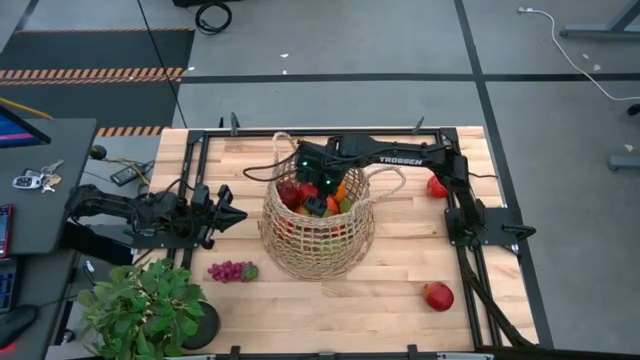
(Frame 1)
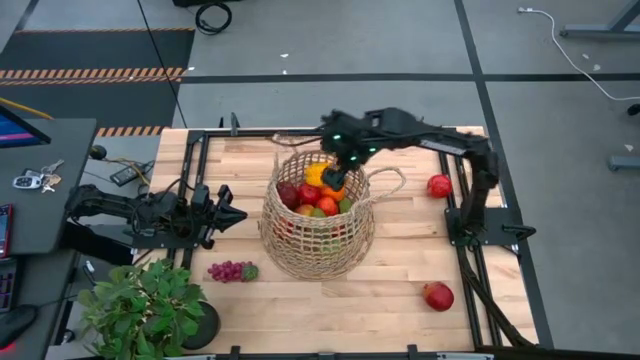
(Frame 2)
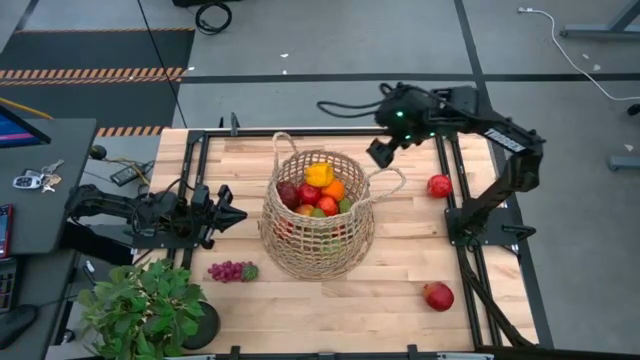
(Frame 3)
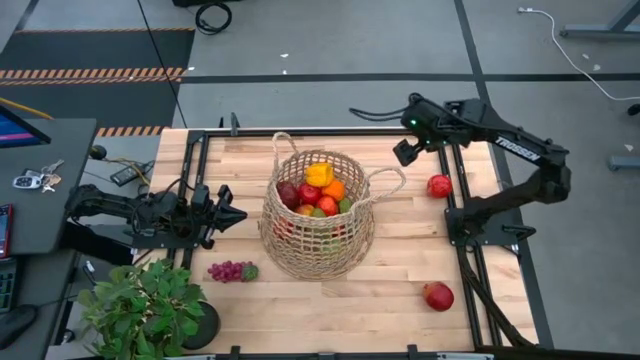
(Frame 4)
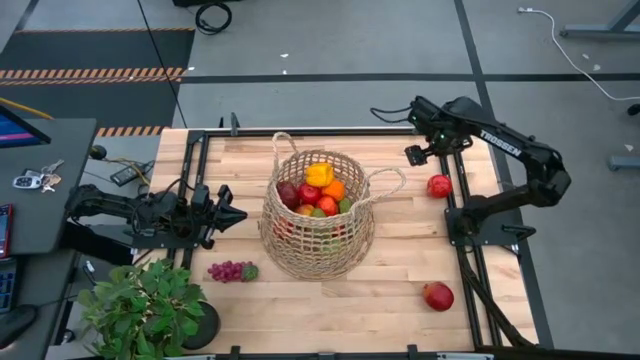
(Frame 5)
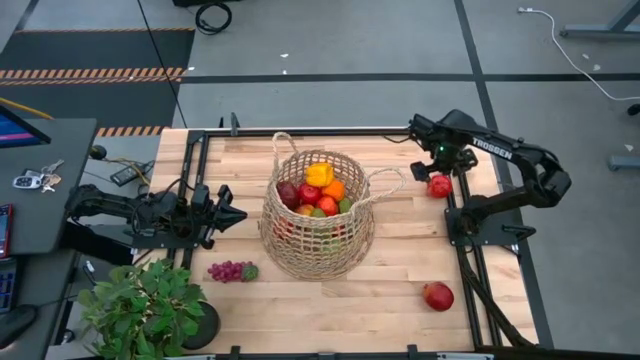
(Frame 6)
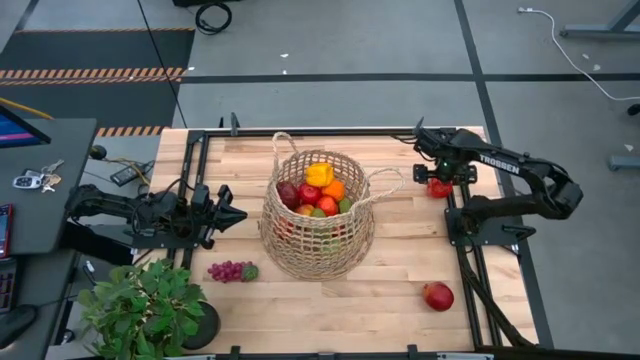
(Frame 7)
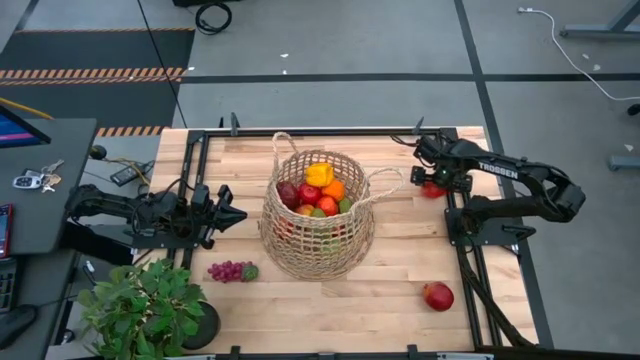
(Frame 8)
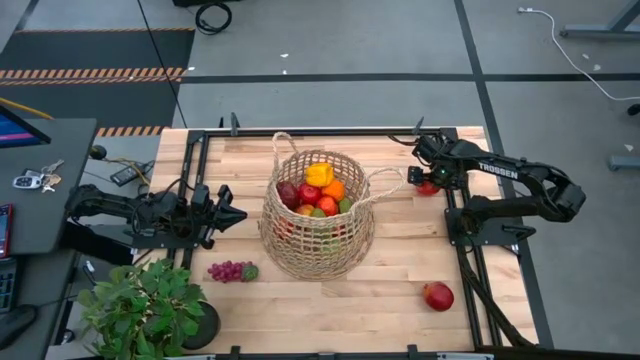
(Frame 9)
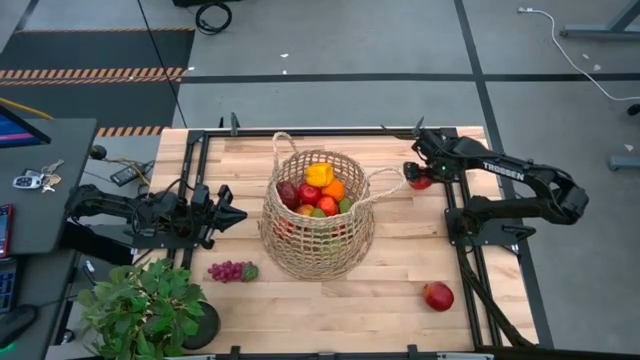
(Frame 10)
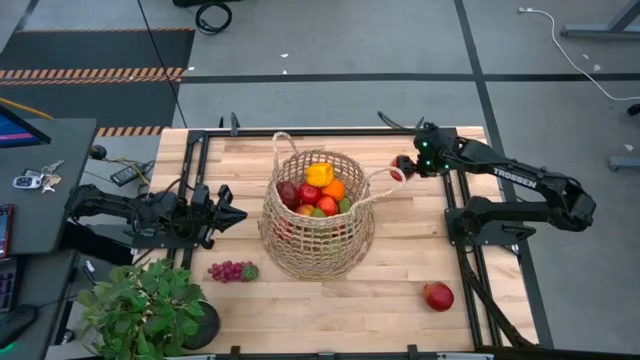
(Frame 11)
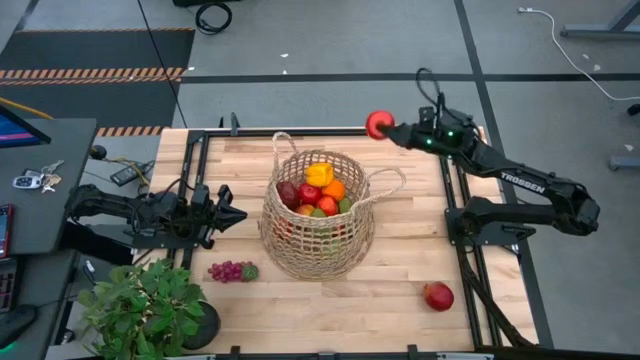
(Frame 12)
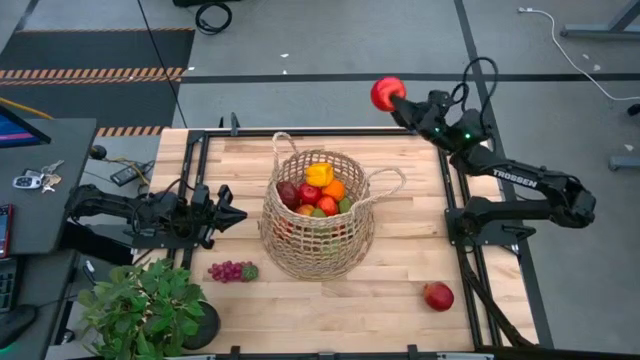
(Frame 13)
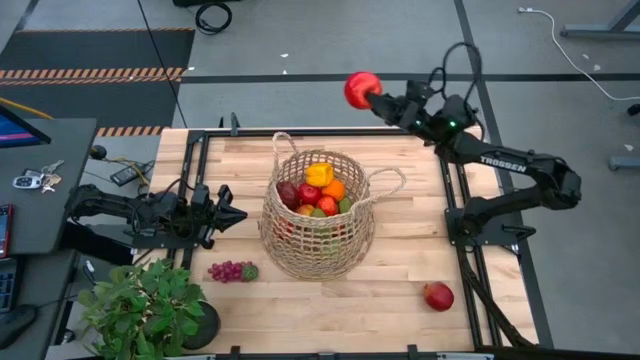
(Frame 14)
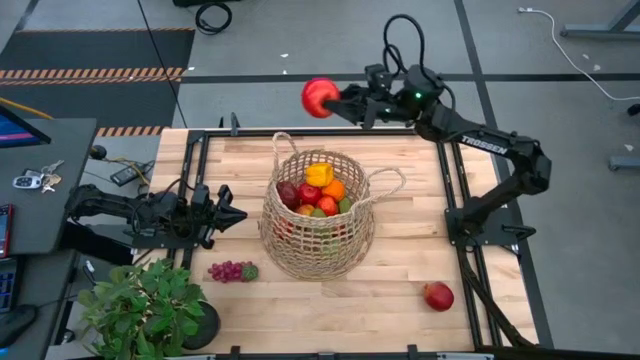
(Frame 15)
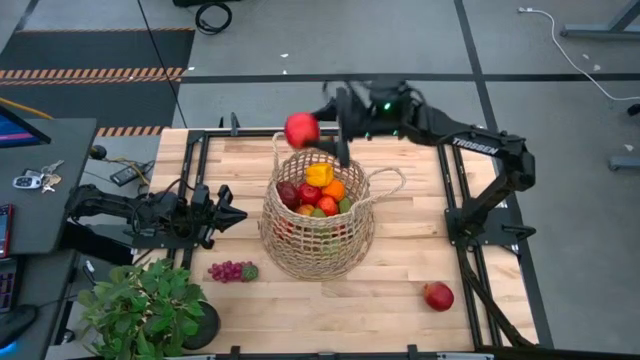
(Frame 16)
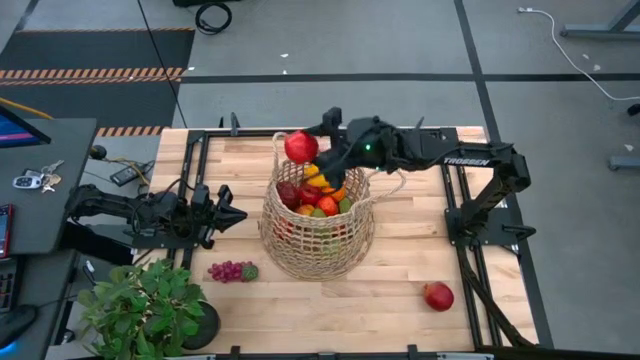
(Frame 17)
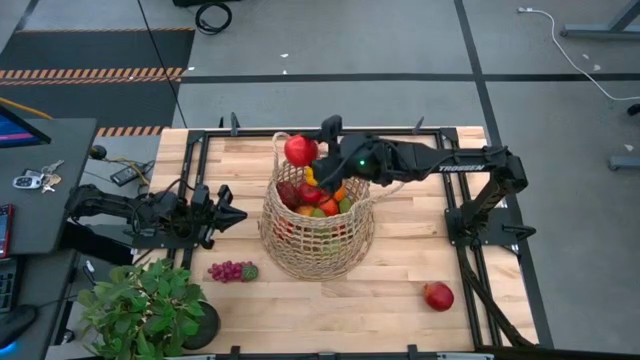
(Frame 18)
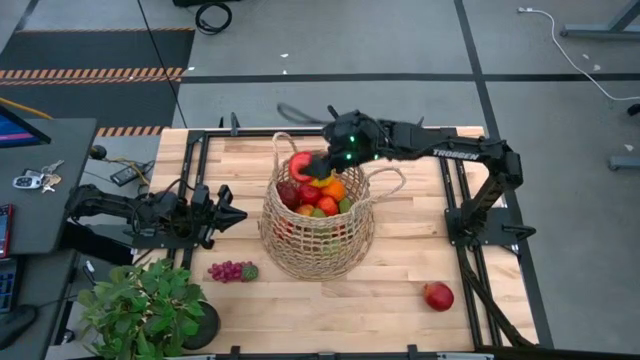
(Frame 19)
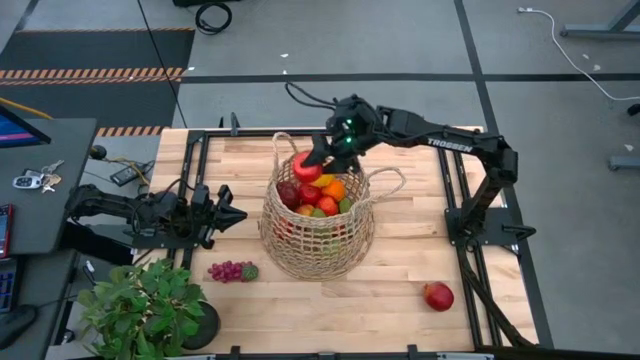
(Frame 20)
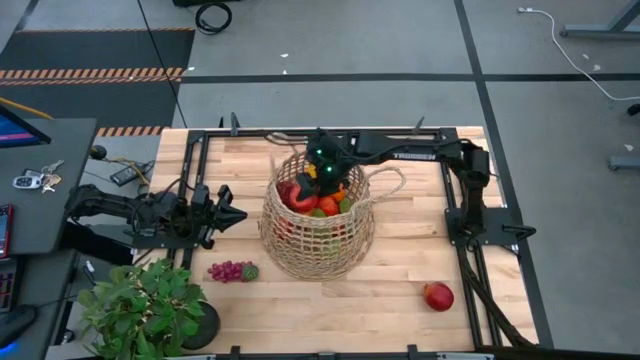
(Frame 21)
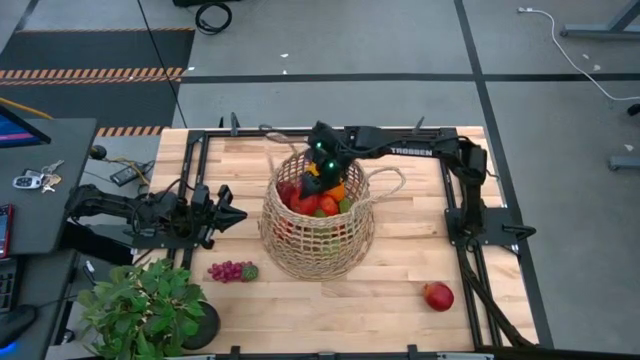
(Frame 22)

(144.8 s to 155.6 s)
Task: Build produce basket
Put the red apple into the brown basket

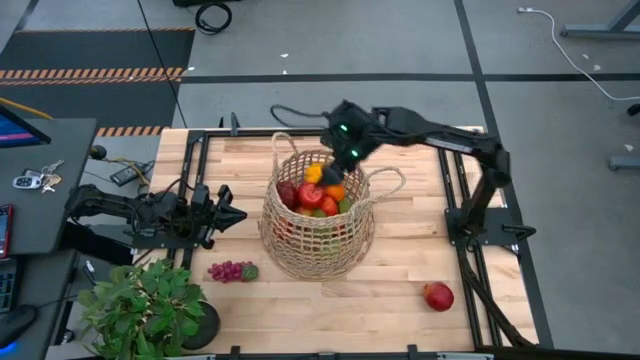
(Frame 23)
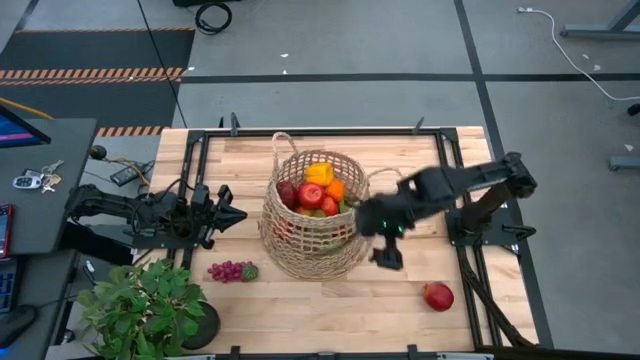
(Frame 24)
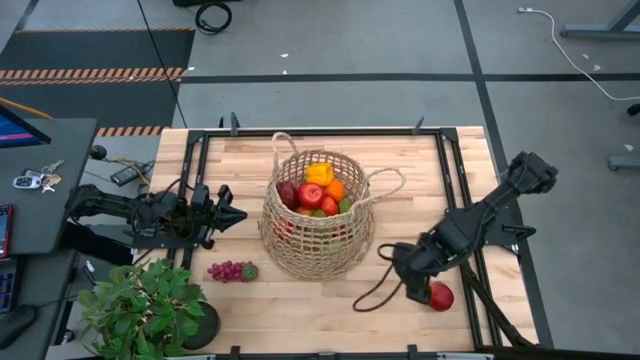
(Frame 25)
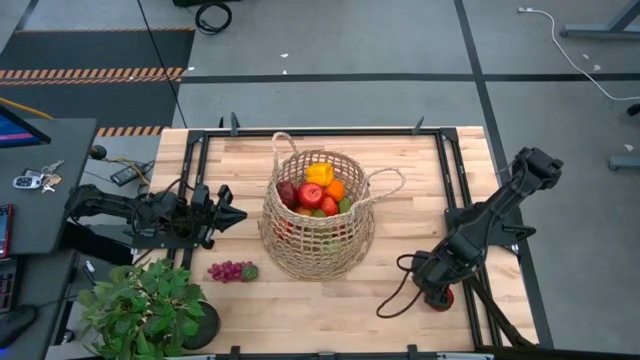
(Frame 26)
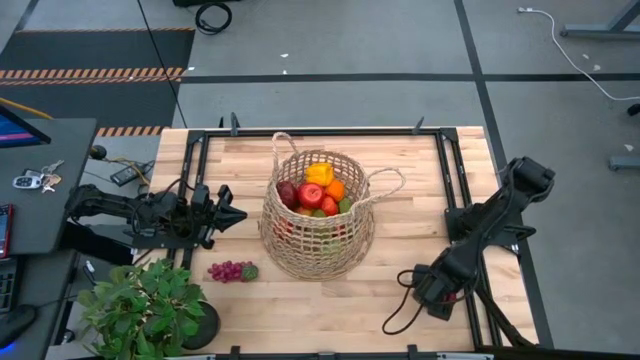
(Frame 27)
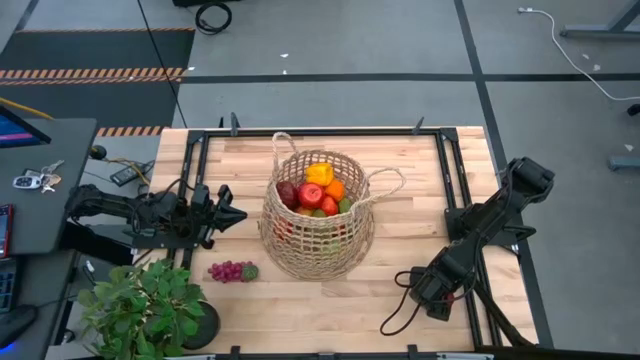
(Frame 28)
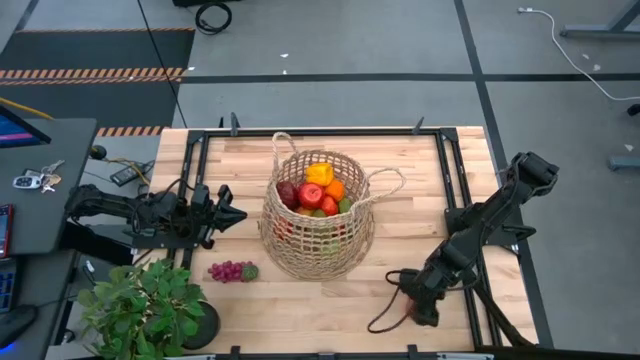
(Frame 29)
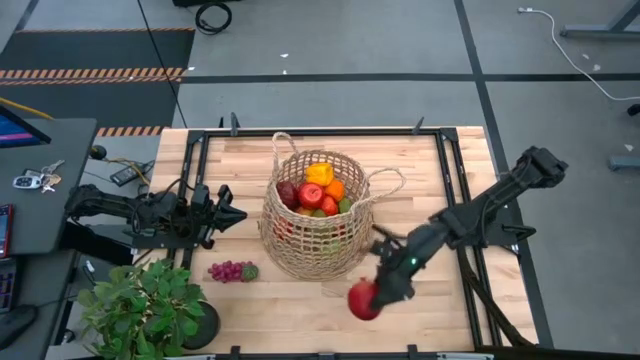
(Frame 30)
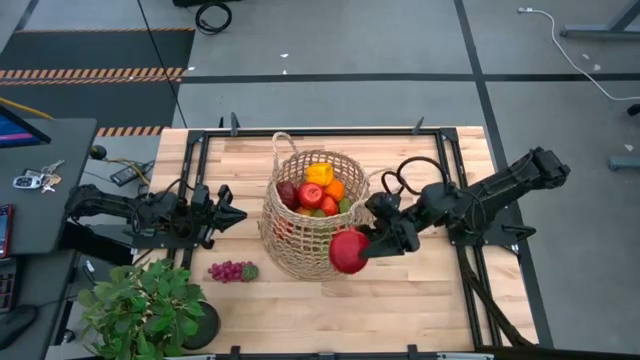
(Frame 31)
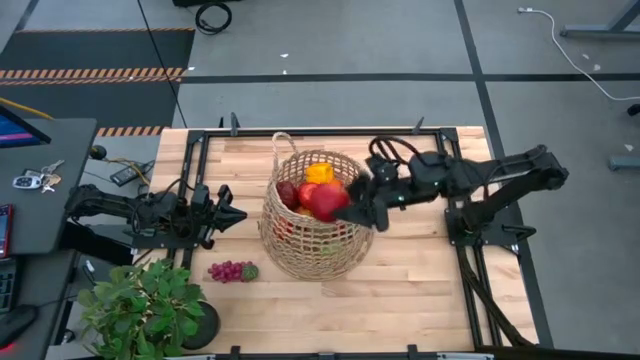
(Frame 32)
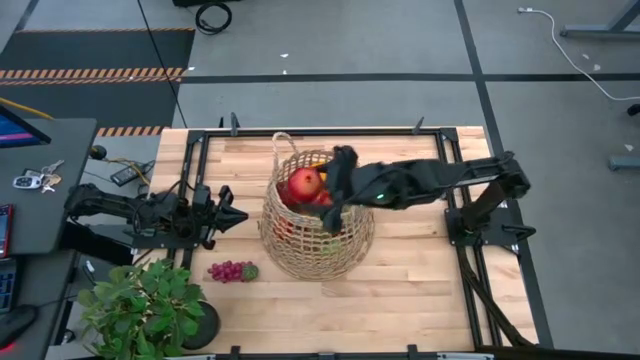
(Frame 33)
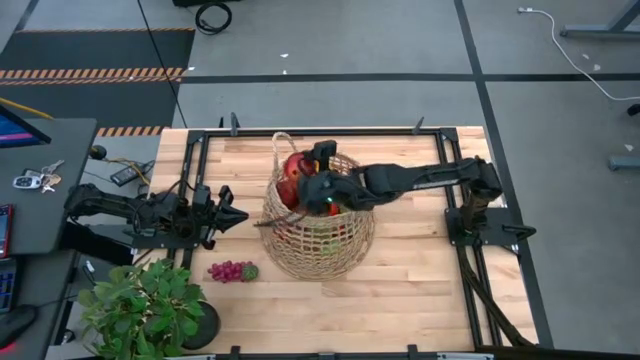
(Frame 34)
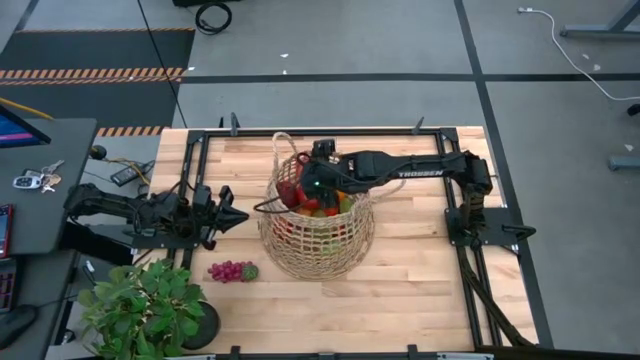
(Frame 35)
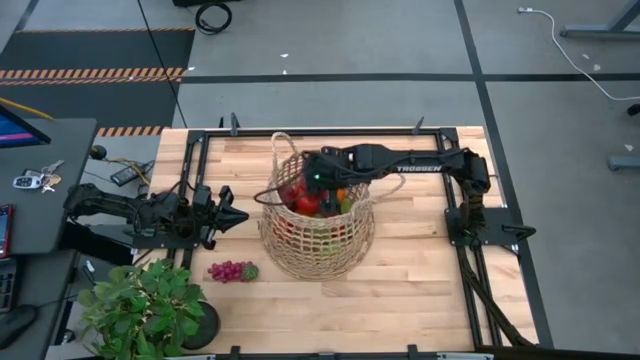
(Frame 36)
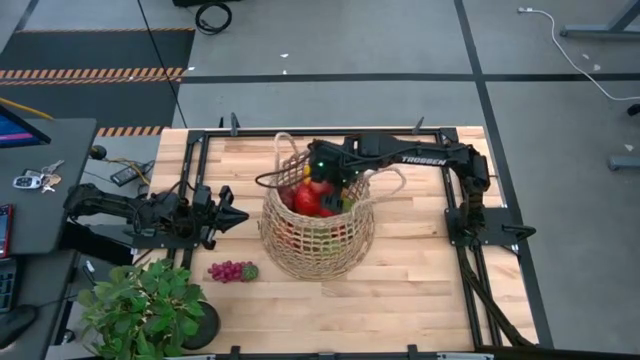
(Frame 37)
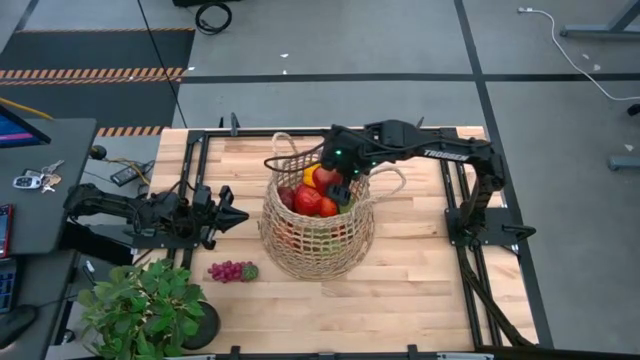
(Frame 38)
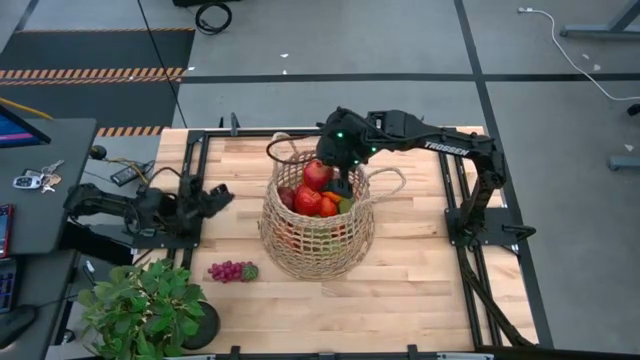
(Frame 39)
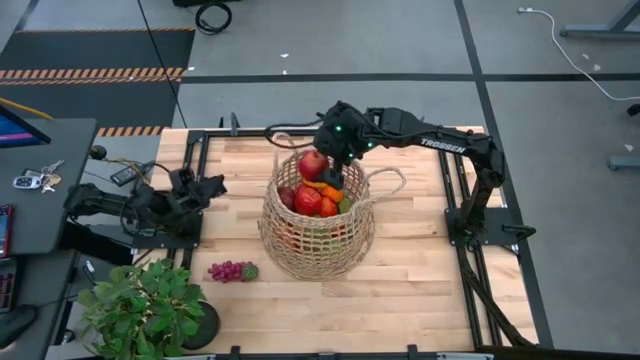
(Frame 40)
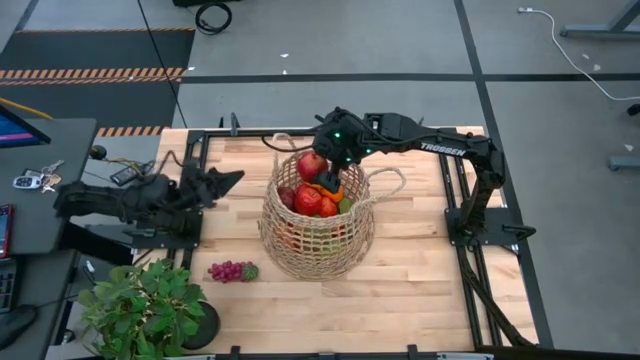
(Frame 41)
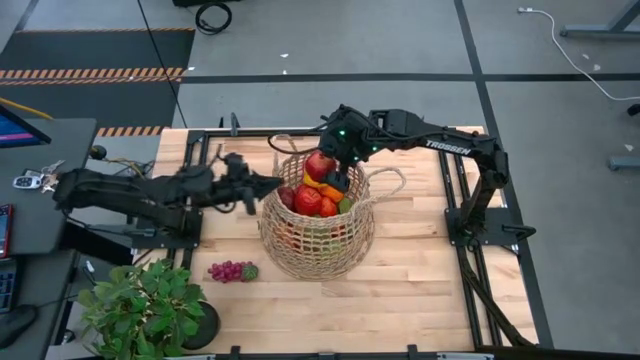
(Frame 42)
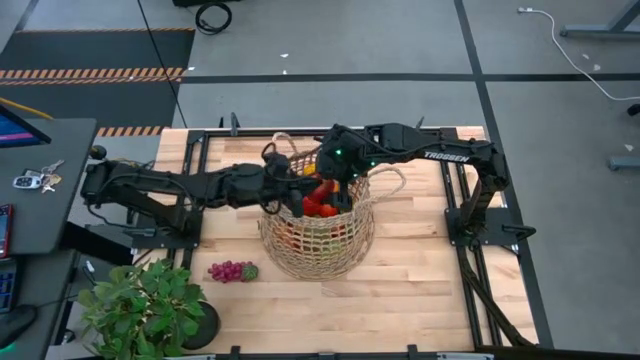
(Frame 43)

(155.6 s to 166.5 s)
Put the red pomegranate into the brown basket
